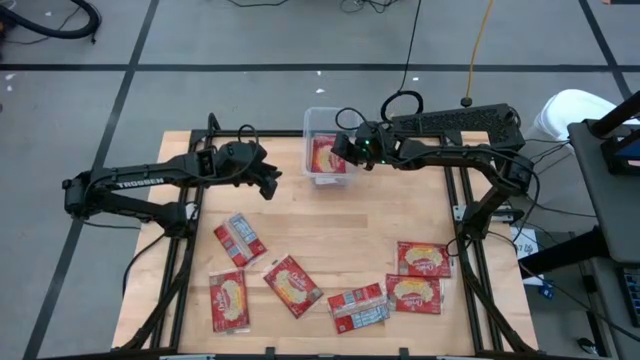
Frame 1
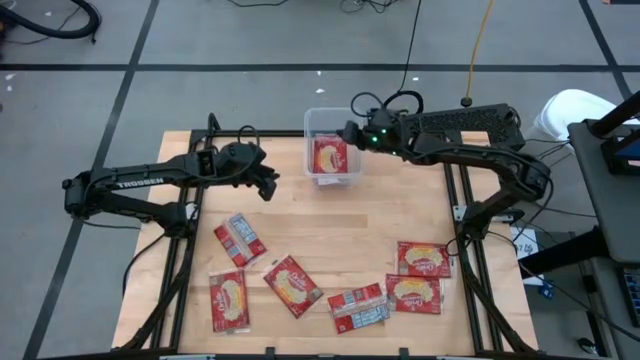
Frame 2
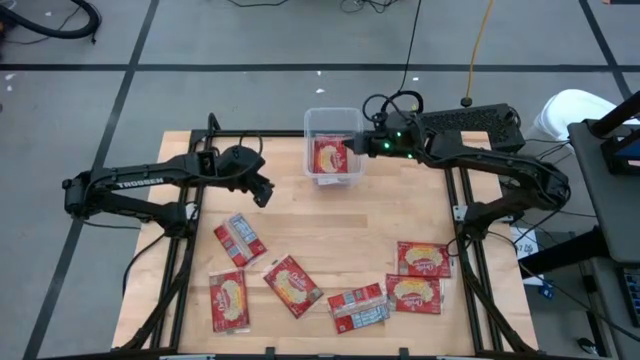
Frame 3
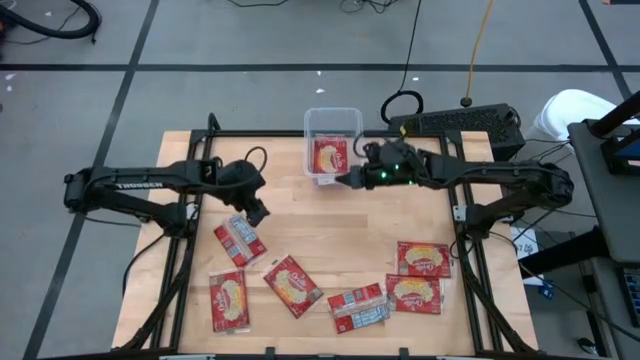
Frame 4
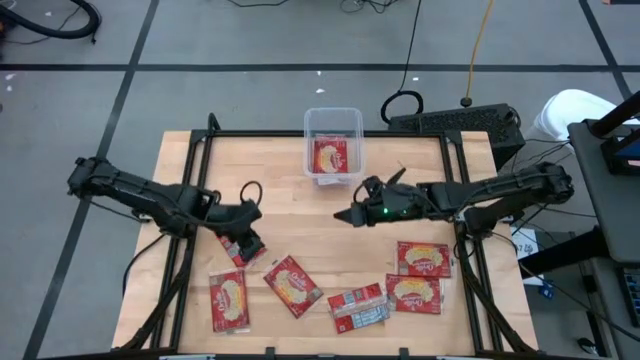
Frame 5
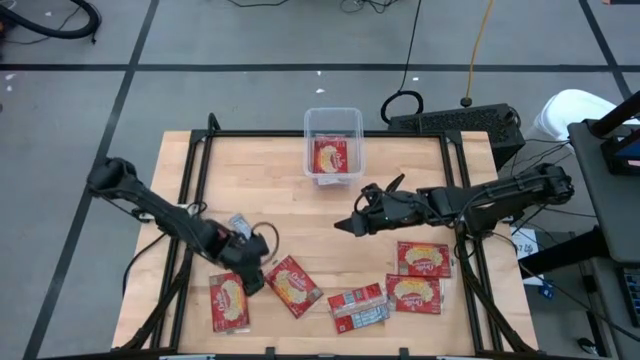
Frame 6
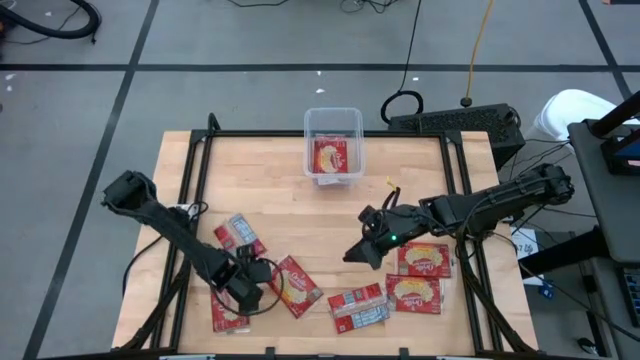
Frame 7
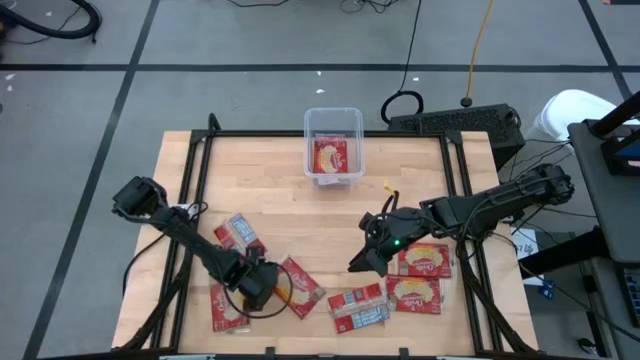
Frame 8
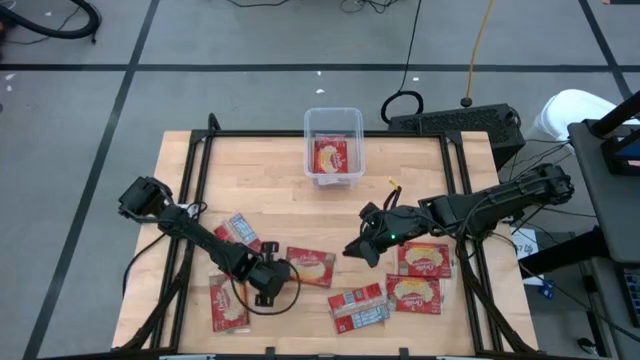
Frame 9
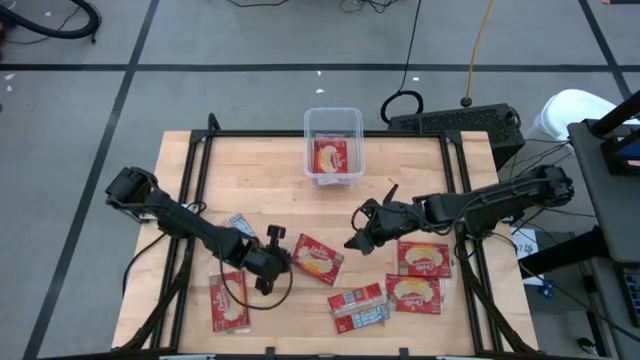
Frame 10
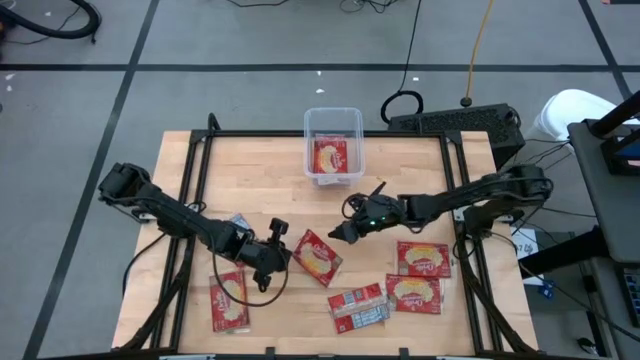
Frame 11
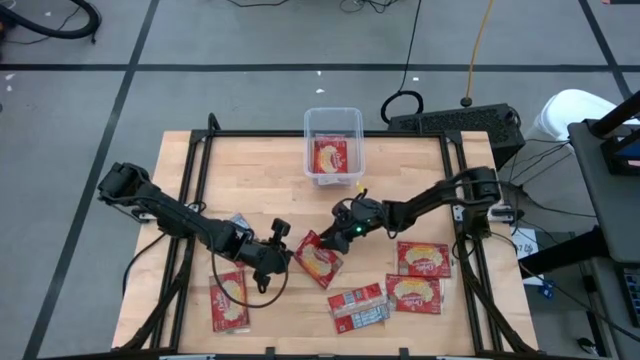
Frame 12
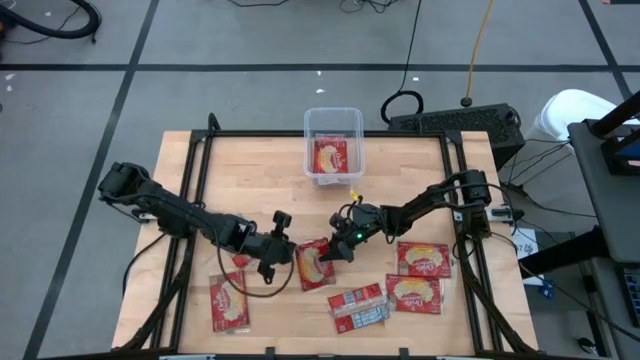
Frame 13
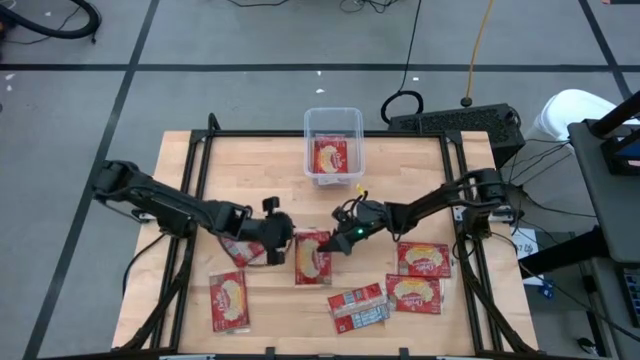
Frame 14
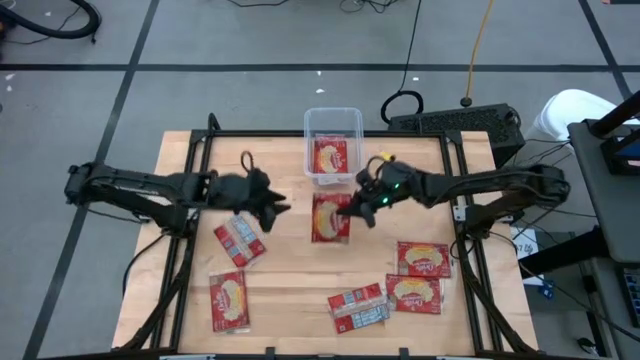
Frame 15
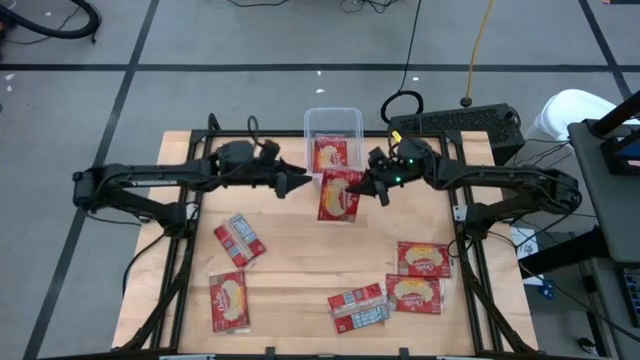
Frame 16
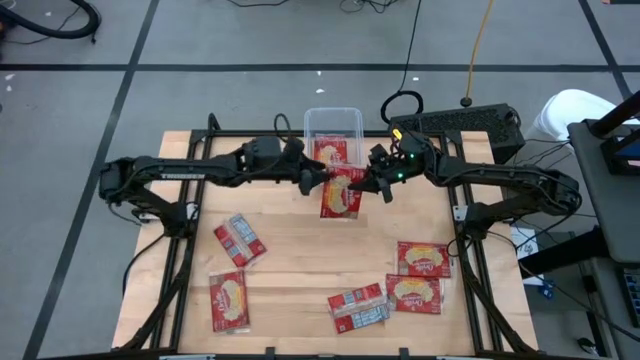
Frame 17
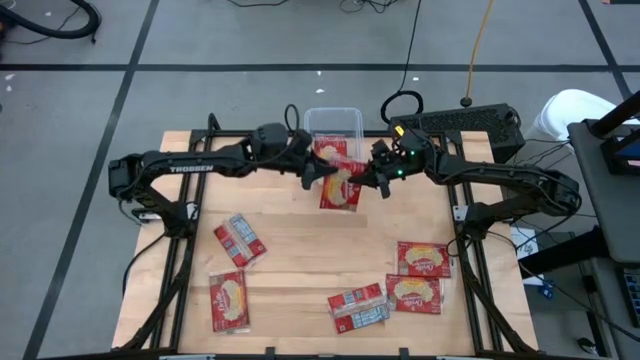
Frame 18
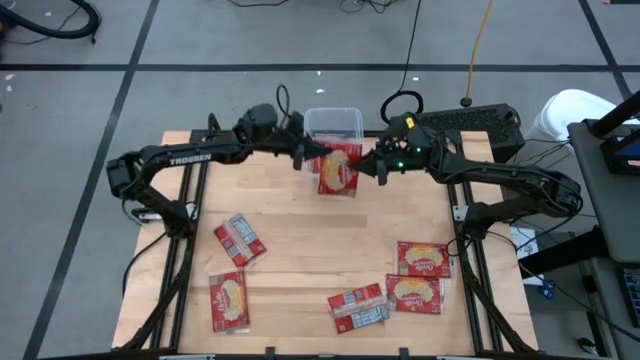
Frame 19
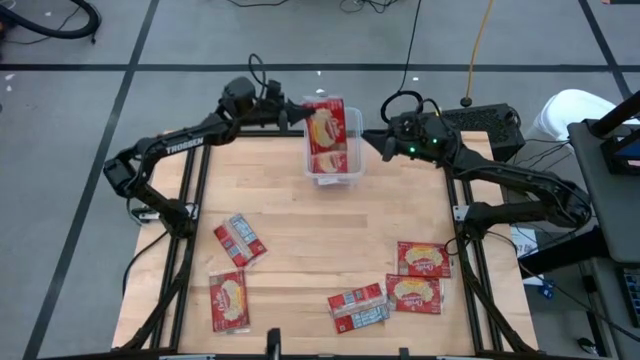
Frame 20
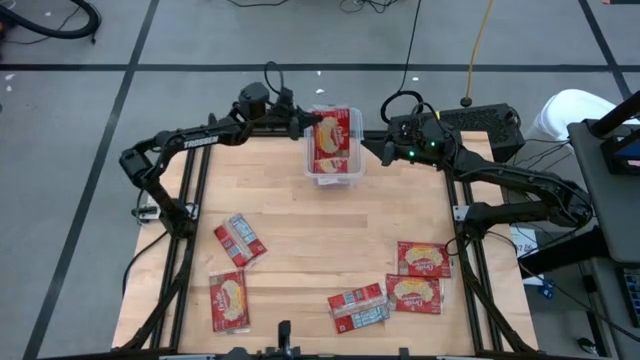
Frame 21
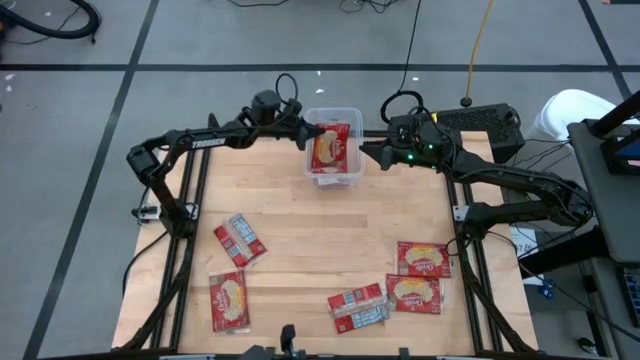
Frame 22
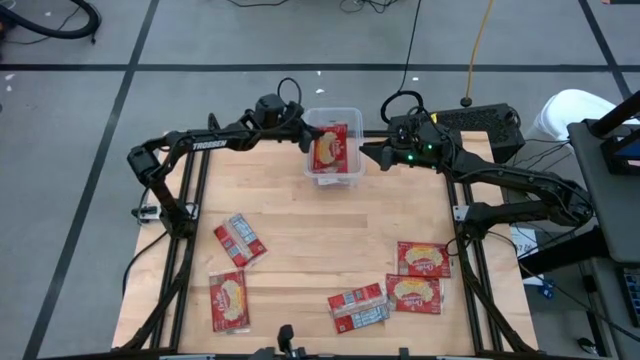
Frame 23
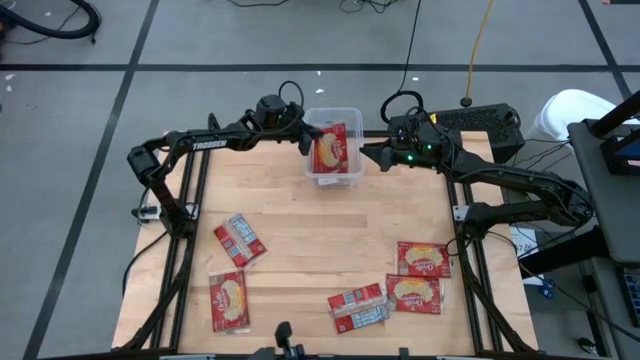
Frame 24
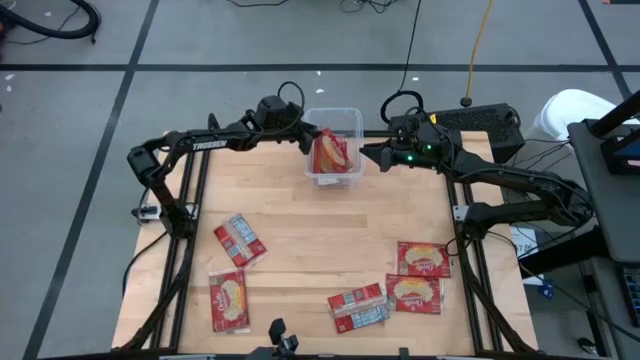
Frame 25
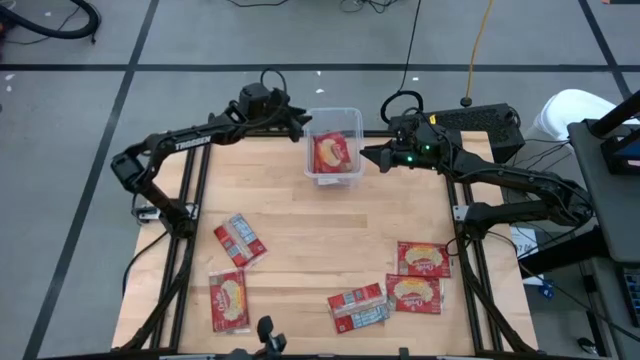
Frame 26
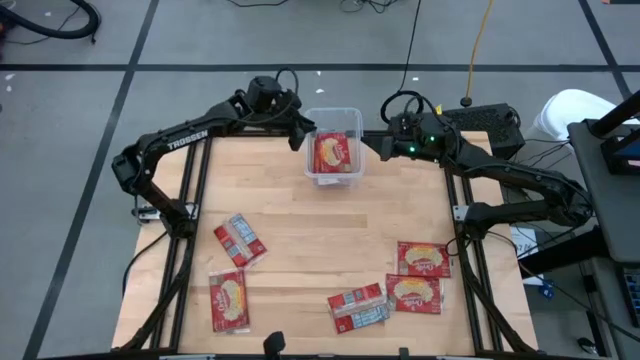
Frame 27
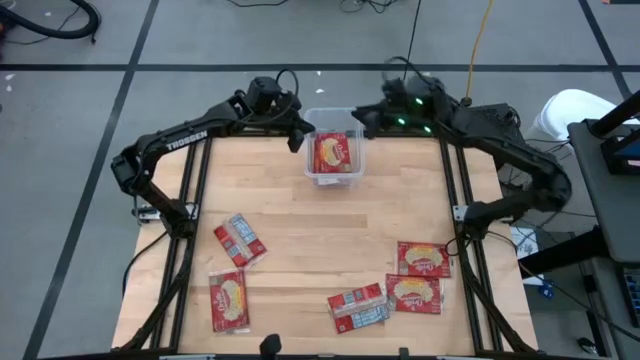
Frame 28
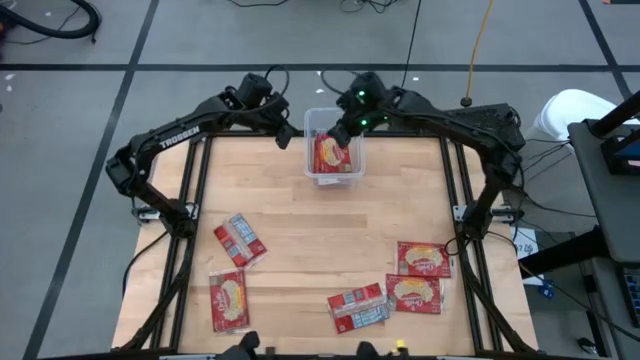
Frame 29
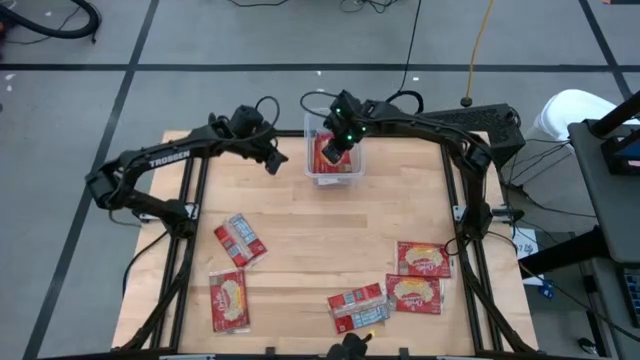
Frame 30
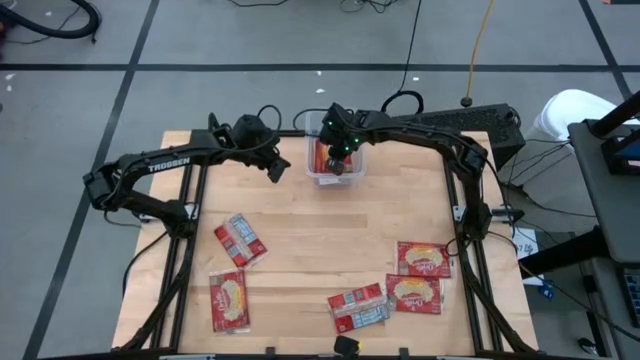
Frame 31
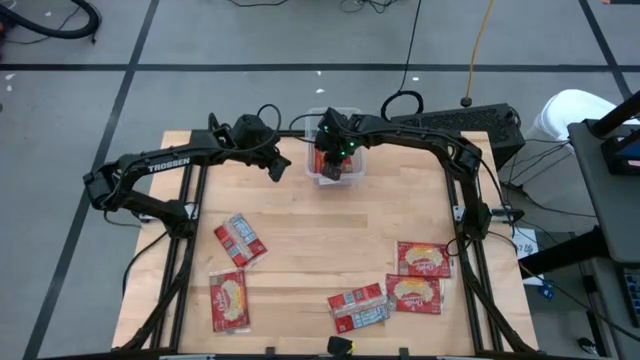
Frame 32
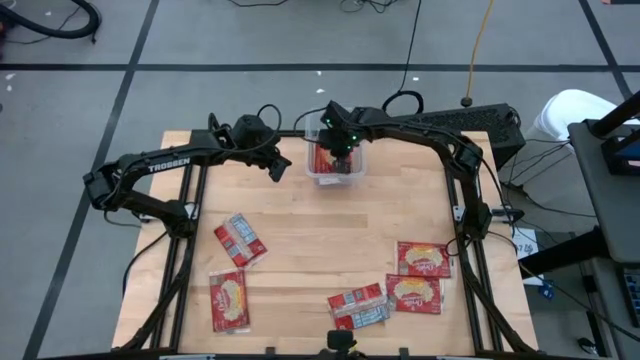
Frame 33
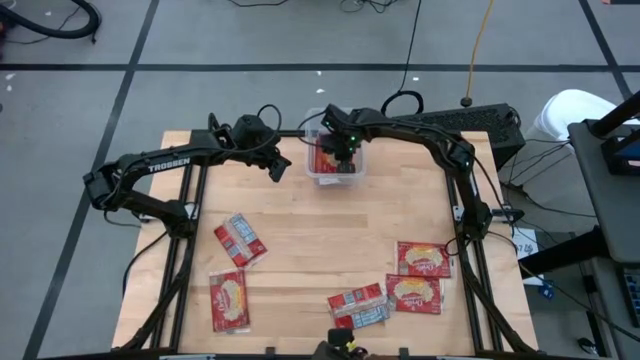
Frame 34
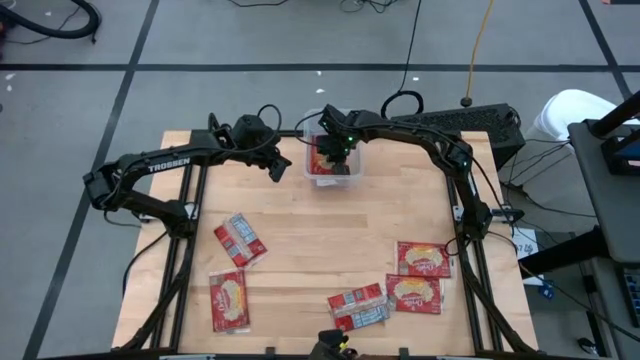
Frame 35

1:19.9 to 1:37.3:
Task: Sort popcorn bags into baskets
Put the red popcorn bag into the transparent container

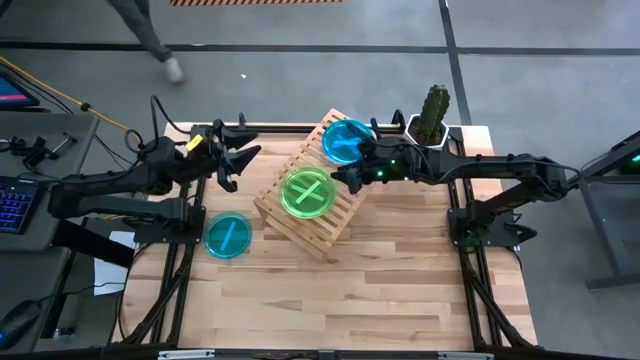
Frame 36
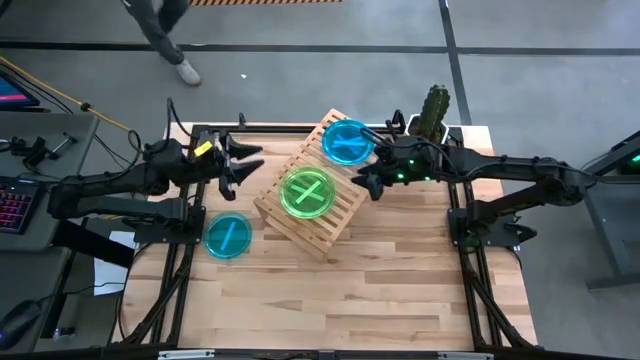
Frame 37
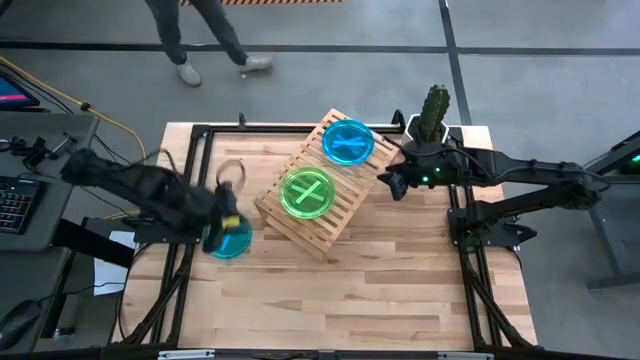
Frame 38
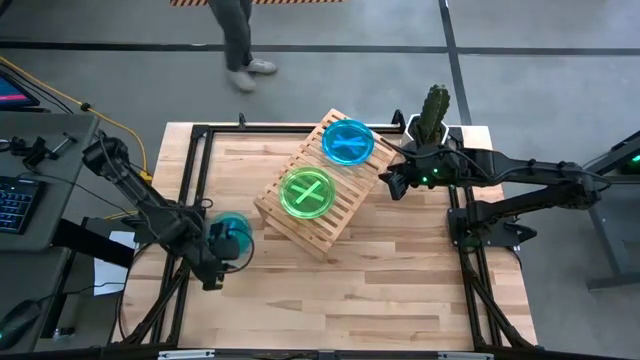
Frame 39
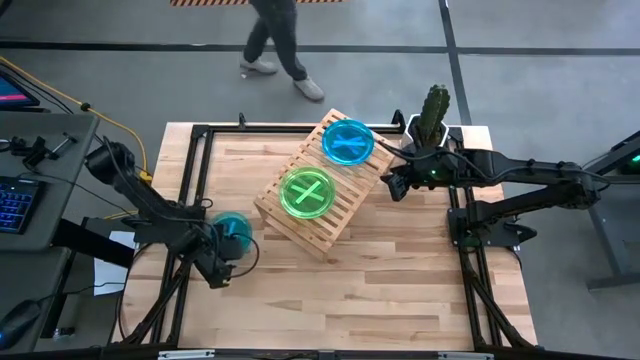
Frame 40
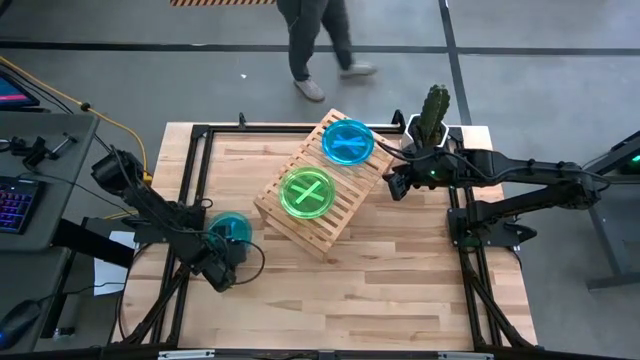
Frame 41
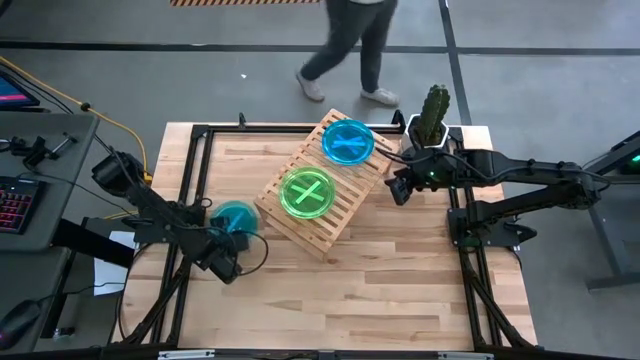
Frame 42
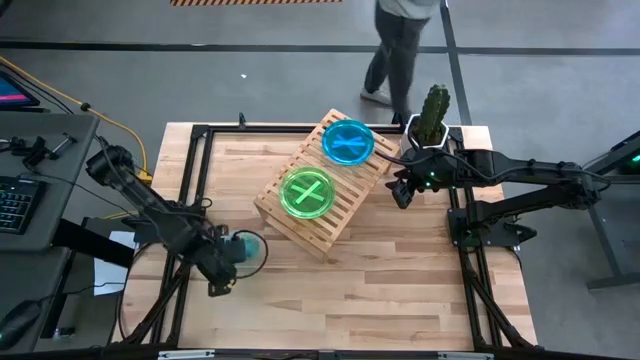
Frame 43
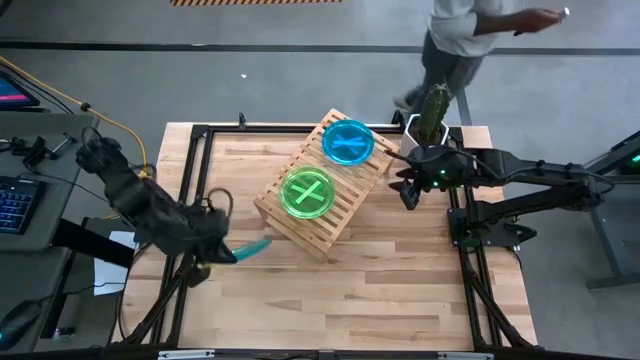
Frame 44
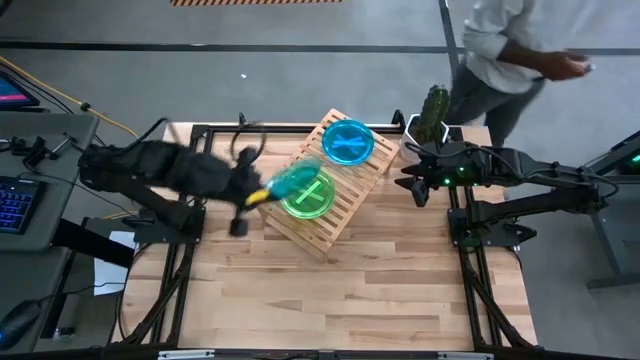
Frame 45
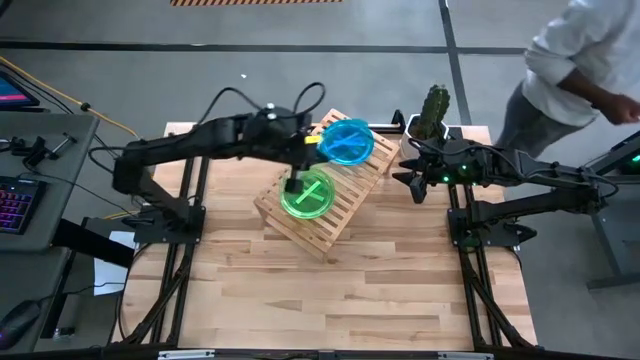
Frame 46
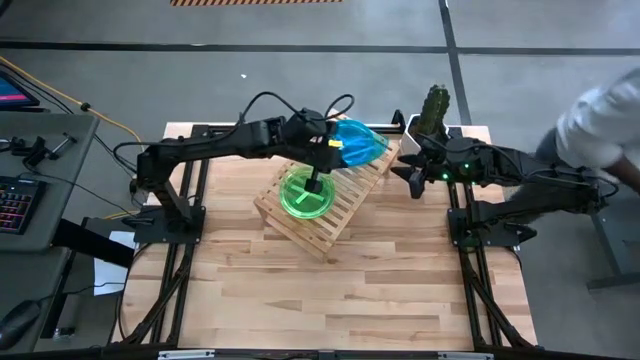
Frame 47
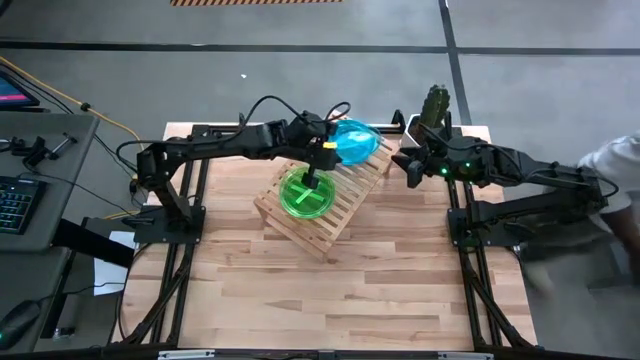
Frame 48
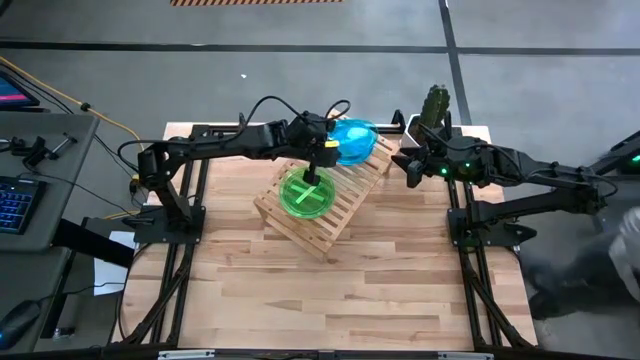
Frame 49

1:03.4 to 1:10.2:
Task: Place and stack plates onto a shelf
Stack the blue plate on top of the blue plate on the shelf
